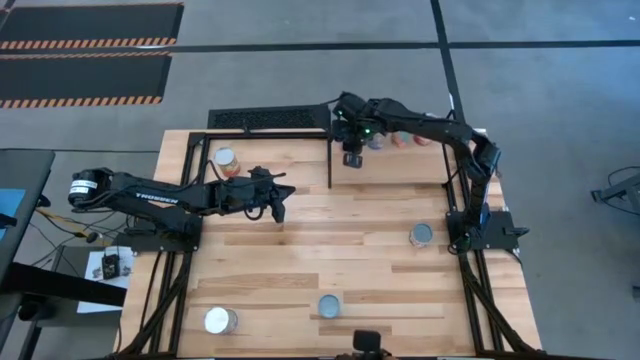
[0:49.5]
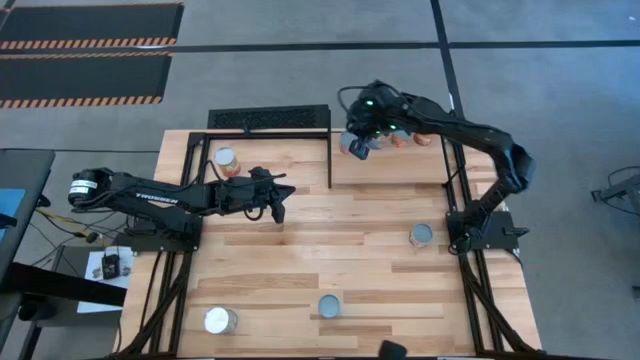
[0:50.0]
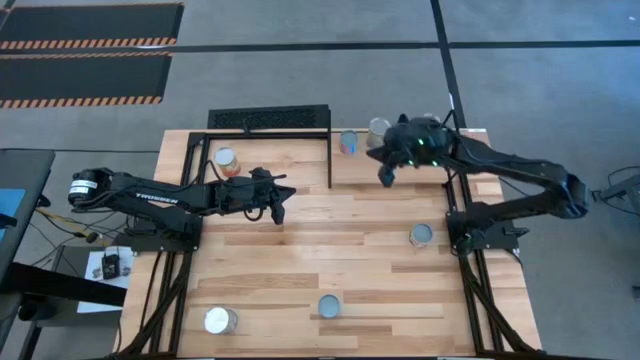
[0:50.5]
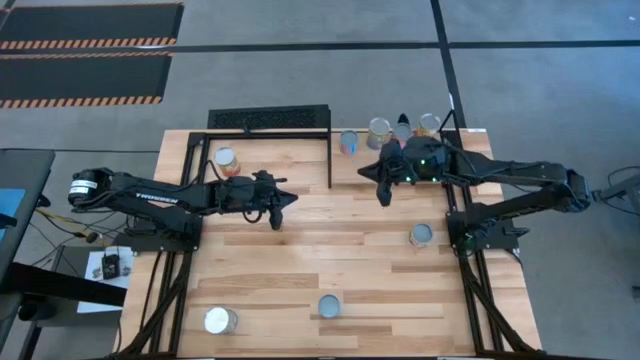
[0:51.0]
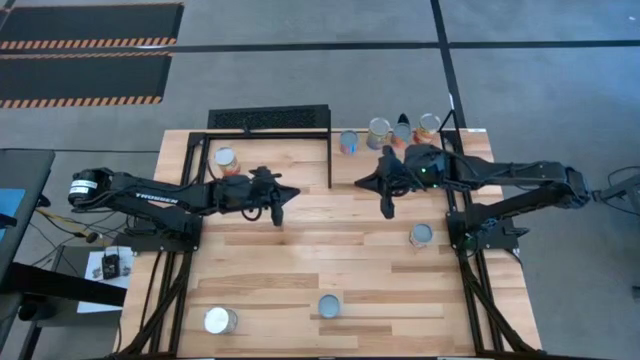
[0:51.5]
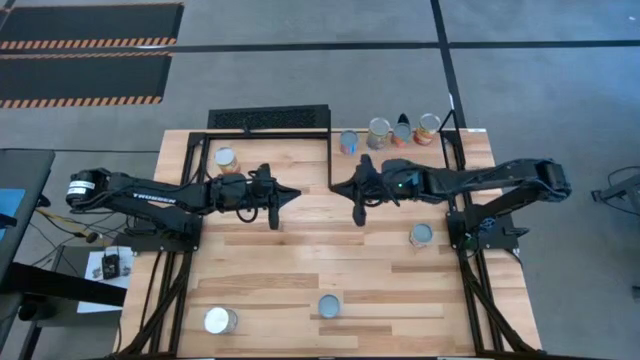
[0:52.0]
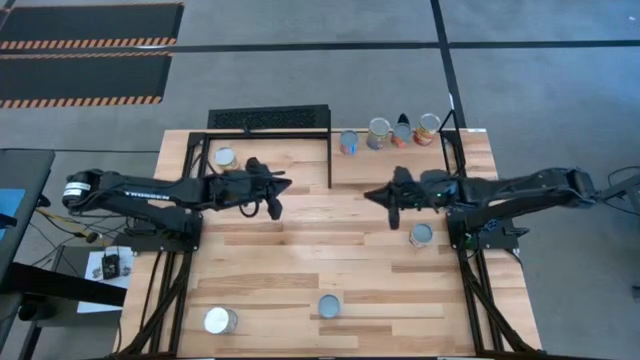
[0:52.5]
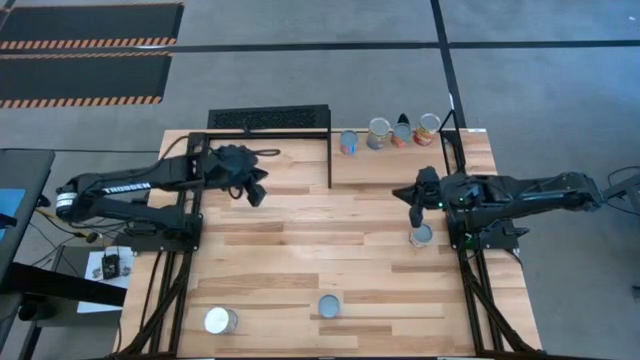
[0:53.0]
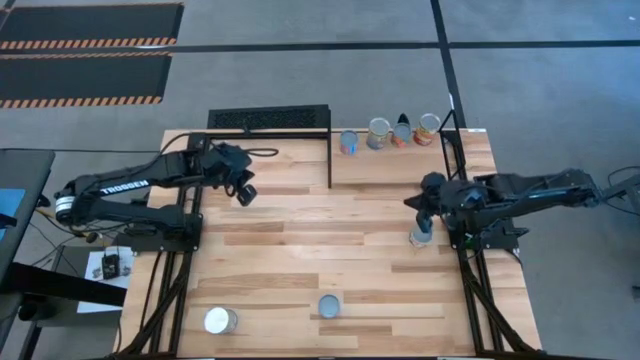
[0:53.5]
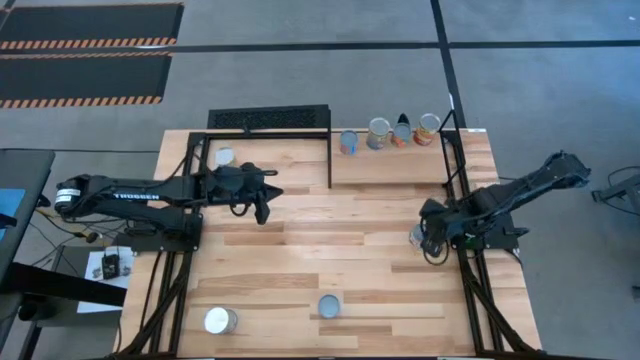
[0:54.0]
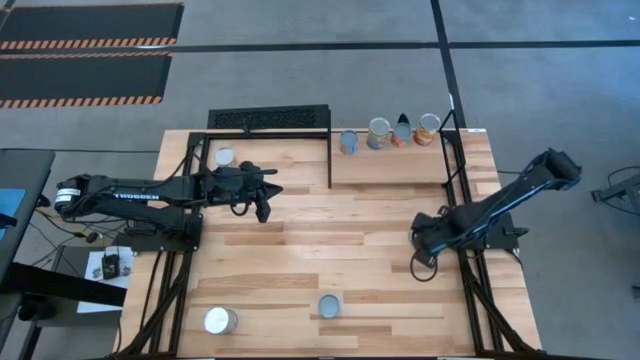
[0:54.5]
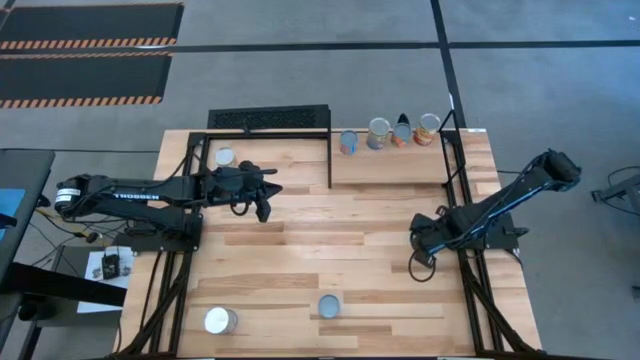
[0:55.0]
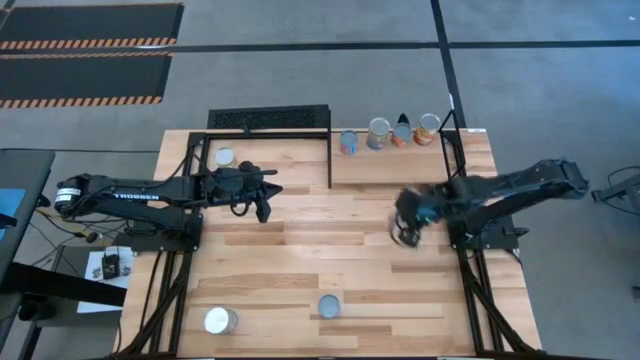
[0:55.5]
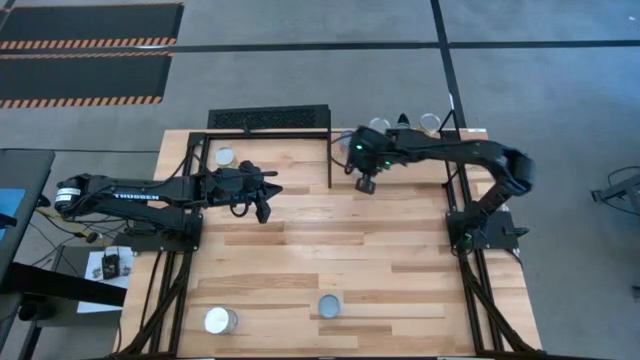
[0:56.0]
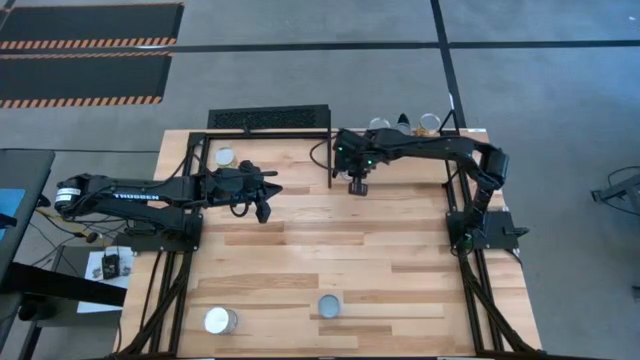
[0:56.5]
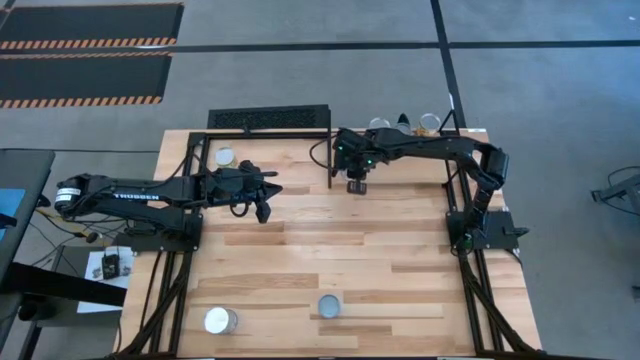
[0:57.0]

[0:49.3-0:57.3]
Task: Pick and place cans onto a shelf
Put the canned peas on the shelf

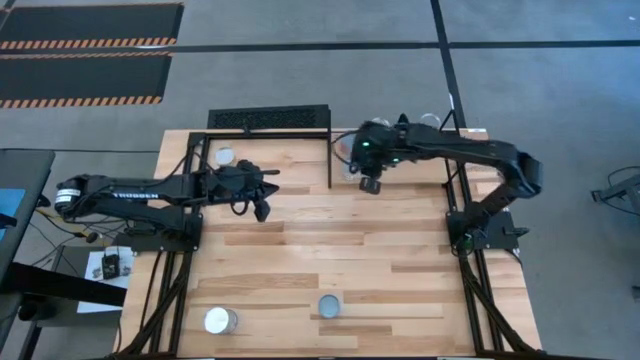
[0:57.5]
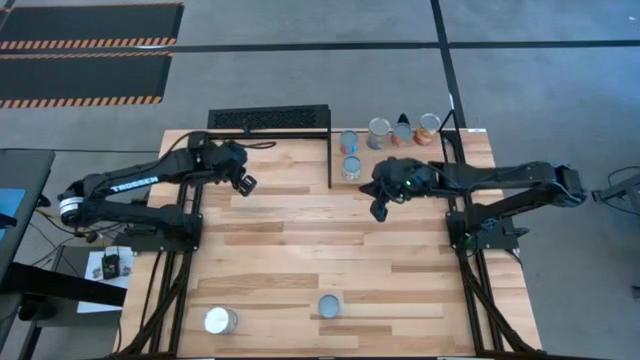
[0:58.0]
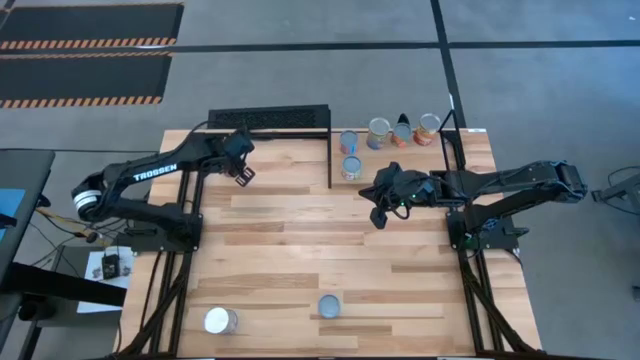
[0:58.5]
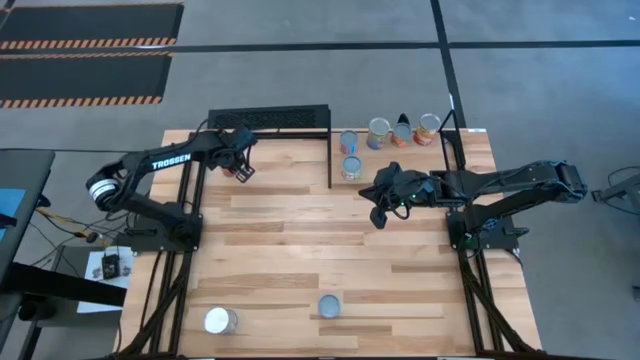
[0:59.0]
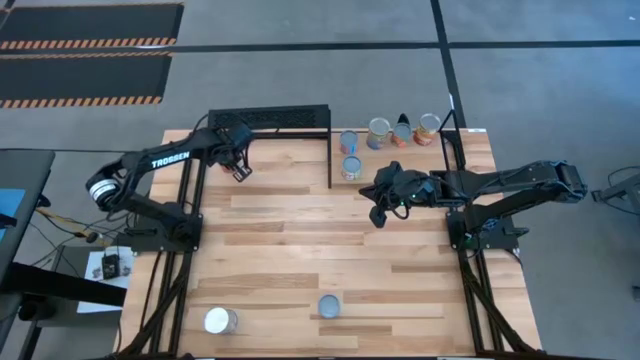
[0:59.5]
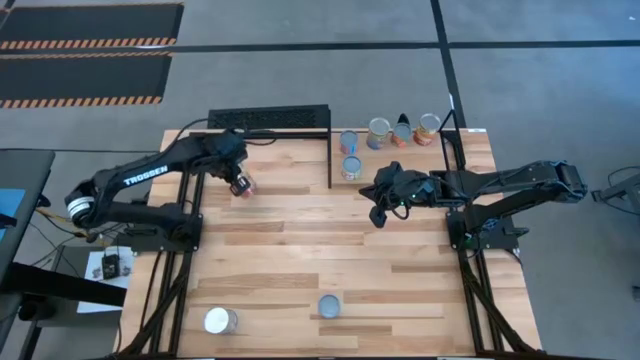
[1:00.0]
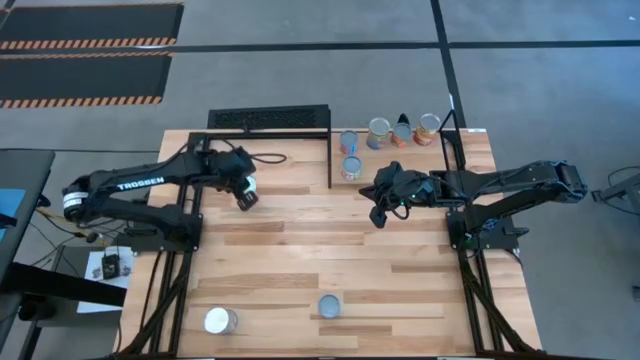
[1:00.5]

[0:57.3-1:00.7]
Put the orange canned corn on the shelf

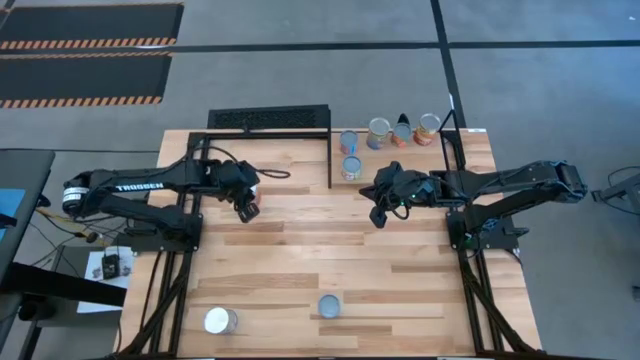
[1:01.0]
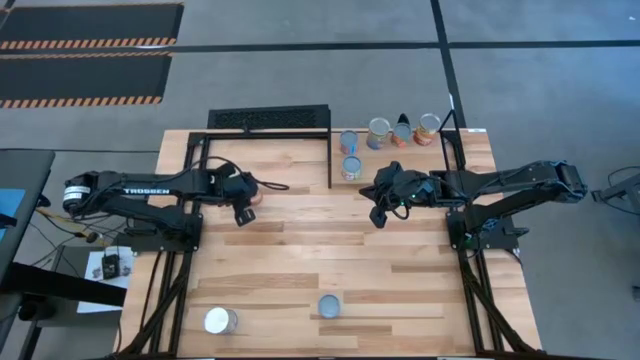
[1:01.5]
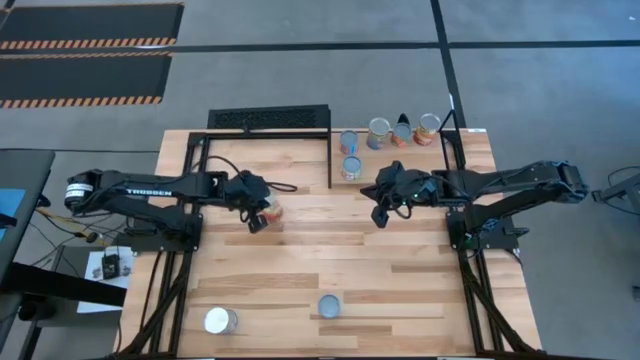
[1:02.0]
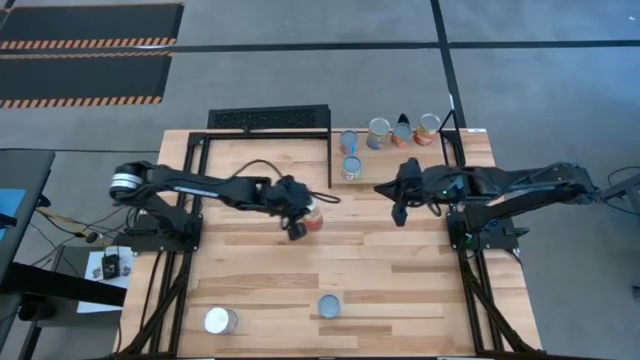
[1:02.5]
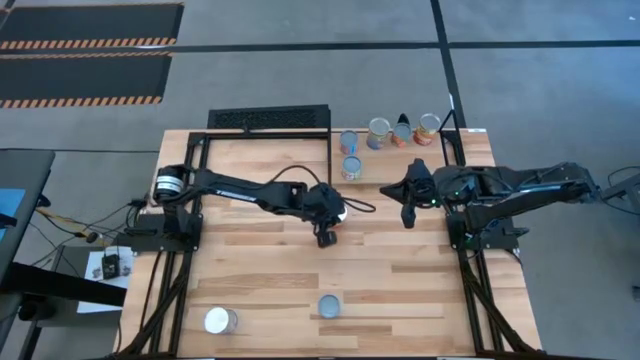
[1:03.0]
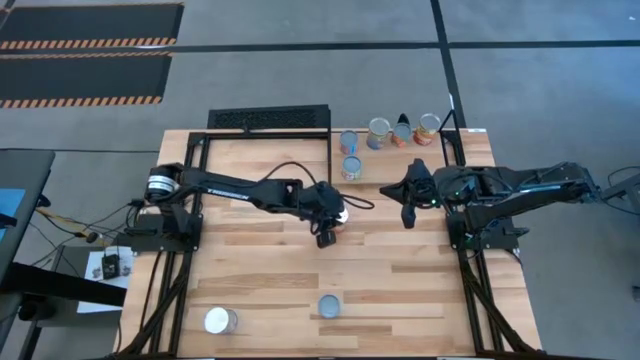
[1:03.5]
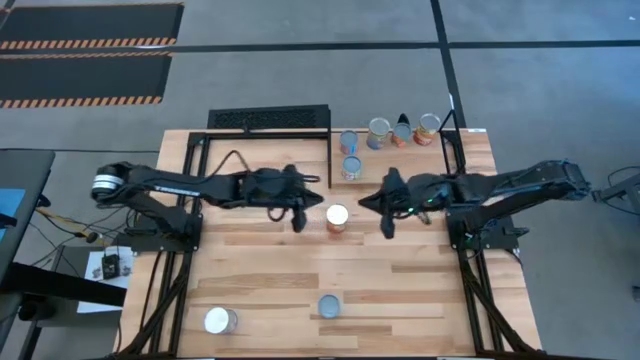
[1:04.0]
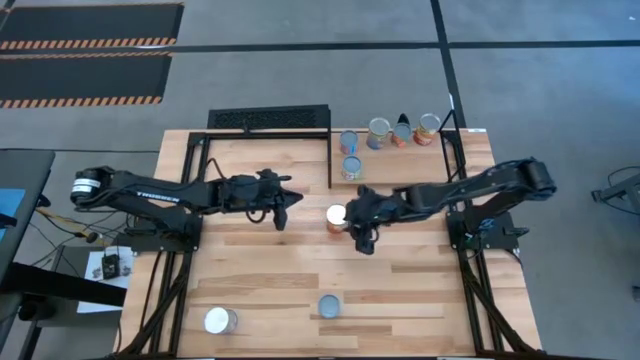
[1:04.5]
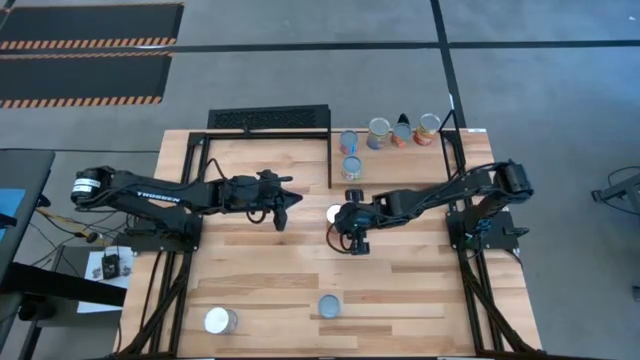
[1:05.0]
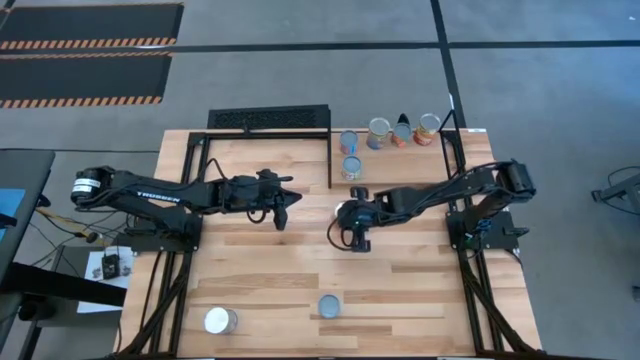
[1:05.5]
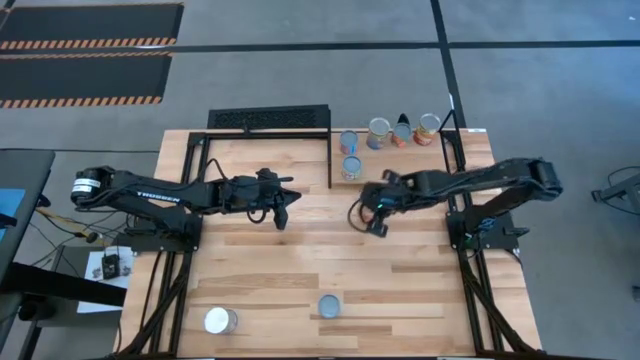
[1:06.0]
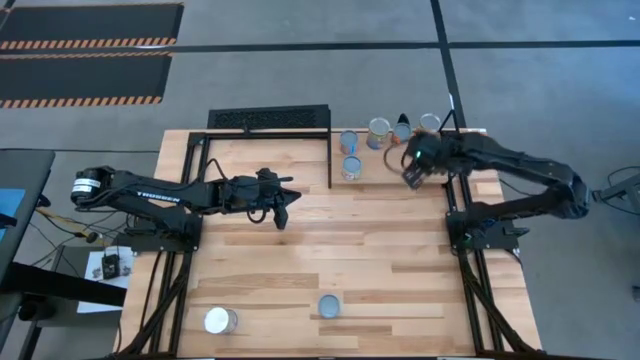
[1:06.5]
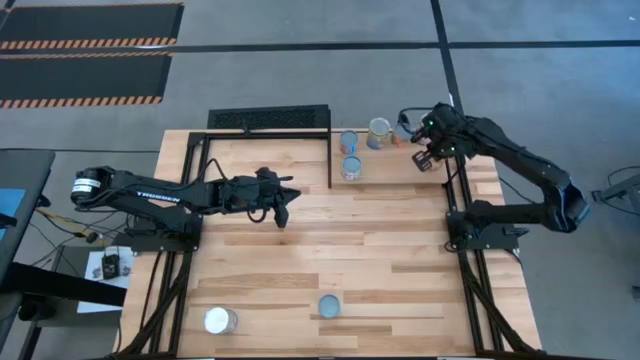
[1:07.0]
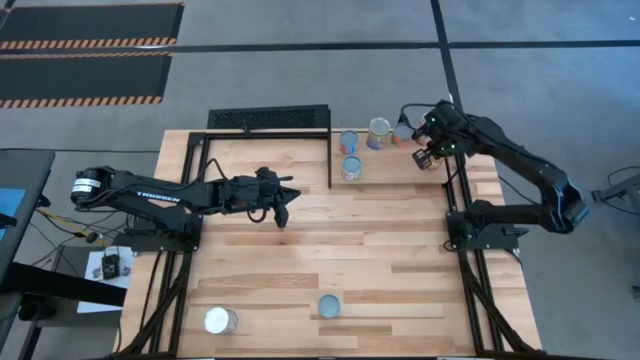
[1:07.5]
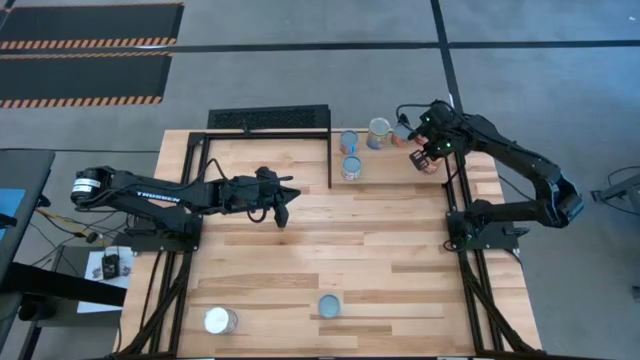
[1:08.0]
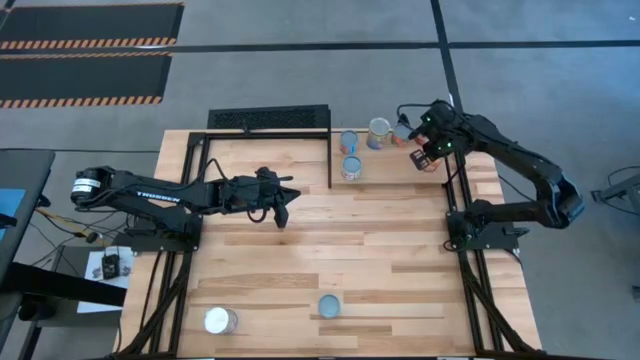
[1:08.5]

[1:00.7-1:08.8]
Put the orange canned corn on the shelf
